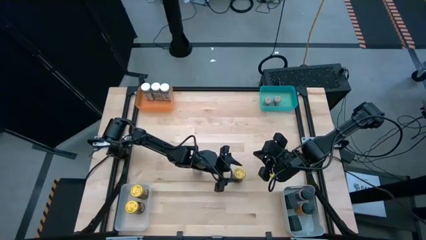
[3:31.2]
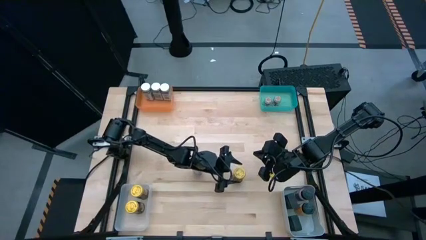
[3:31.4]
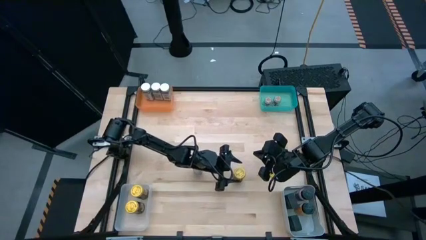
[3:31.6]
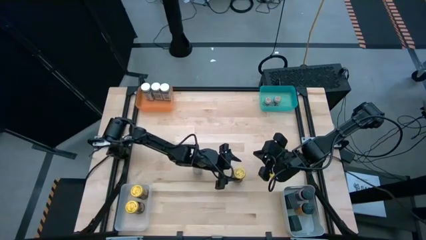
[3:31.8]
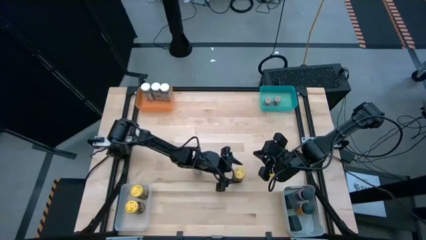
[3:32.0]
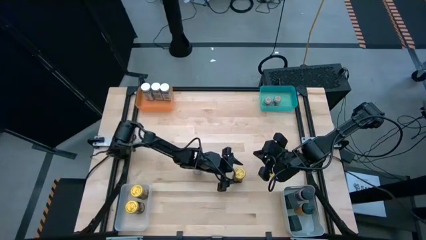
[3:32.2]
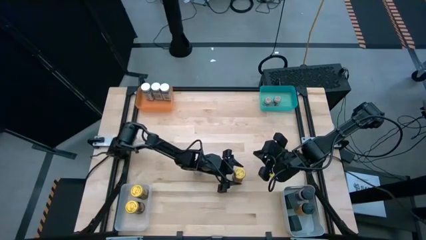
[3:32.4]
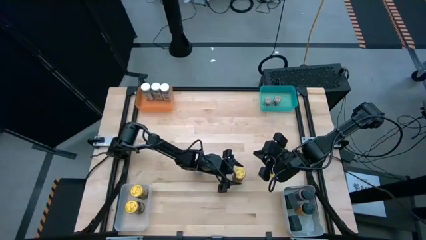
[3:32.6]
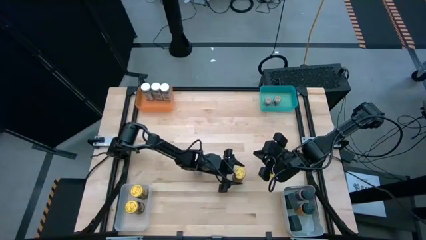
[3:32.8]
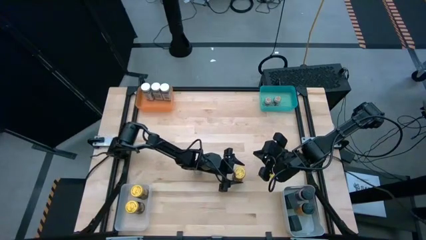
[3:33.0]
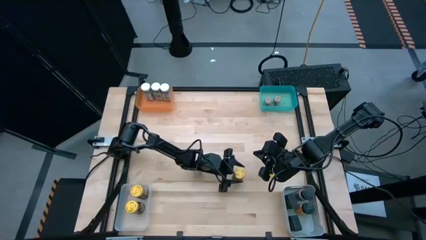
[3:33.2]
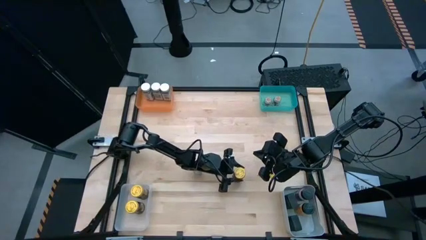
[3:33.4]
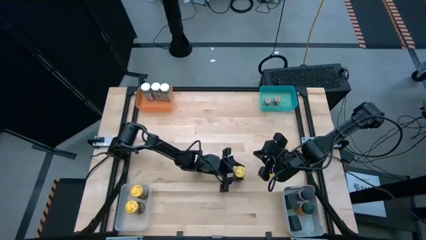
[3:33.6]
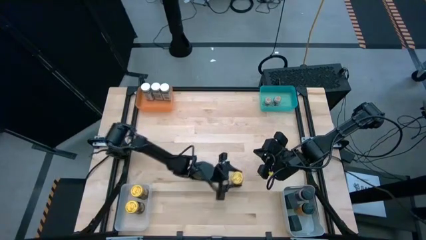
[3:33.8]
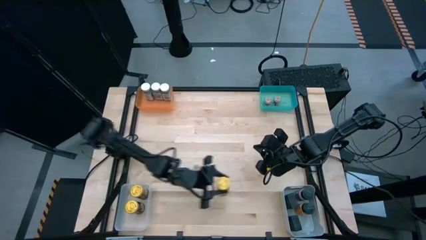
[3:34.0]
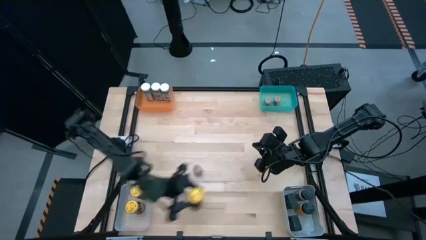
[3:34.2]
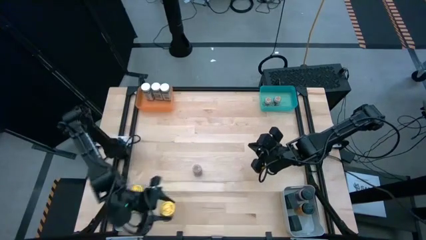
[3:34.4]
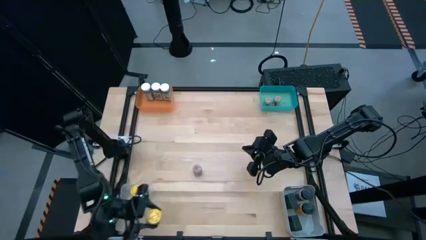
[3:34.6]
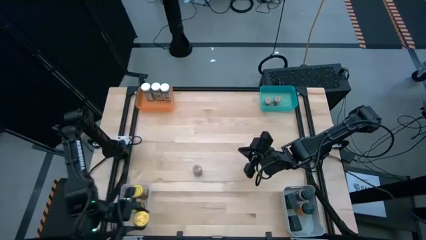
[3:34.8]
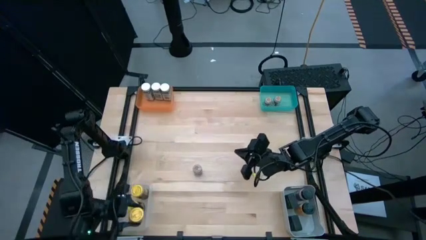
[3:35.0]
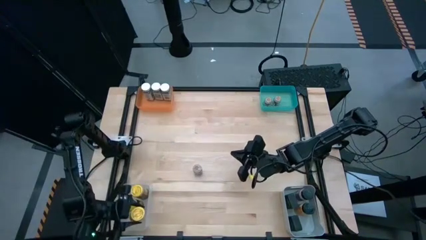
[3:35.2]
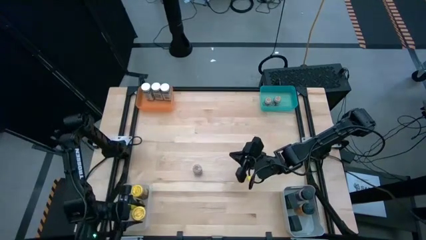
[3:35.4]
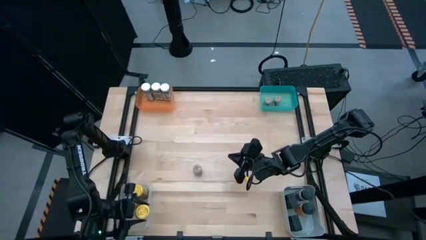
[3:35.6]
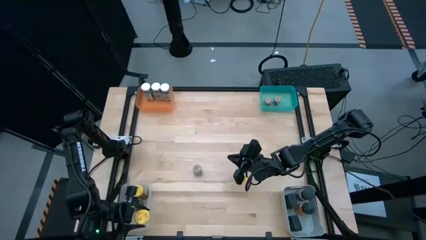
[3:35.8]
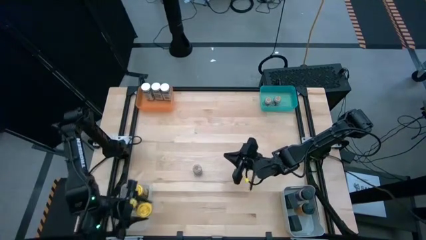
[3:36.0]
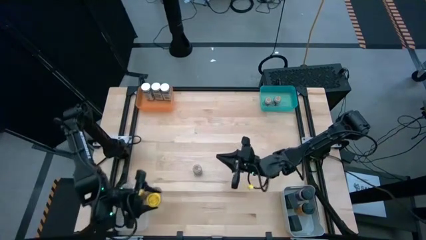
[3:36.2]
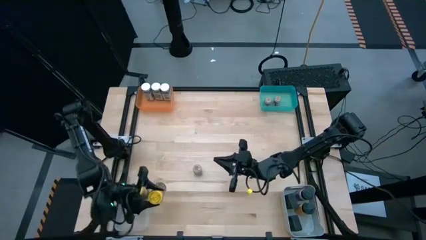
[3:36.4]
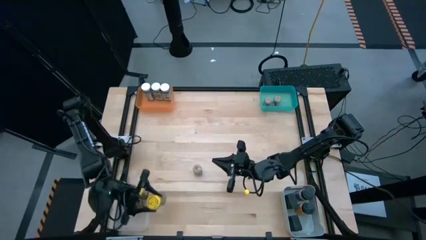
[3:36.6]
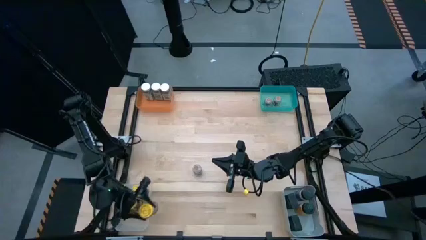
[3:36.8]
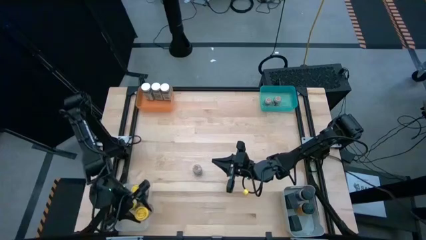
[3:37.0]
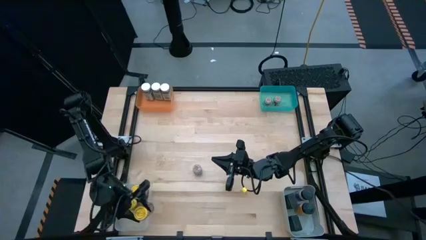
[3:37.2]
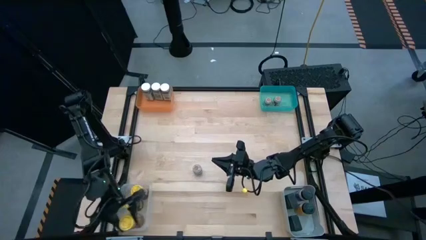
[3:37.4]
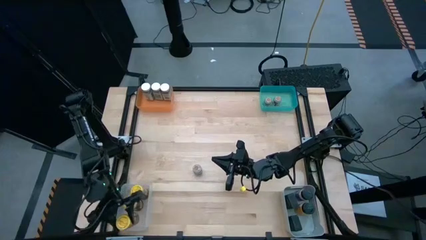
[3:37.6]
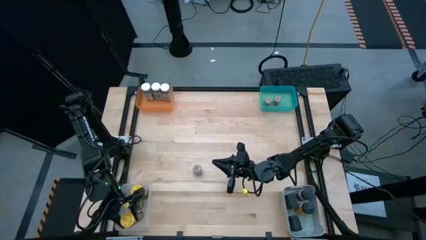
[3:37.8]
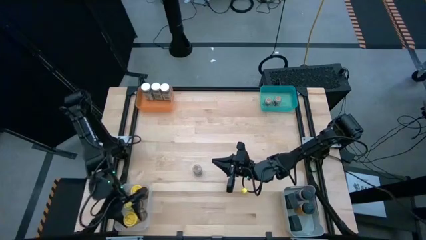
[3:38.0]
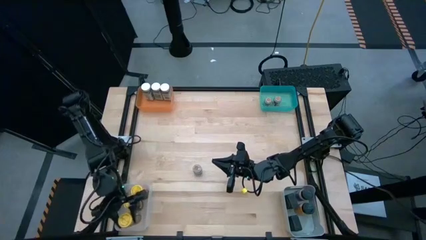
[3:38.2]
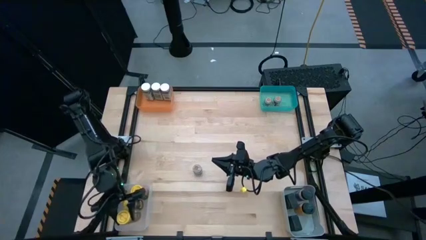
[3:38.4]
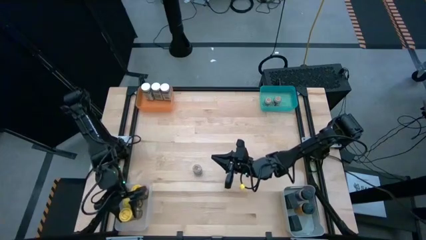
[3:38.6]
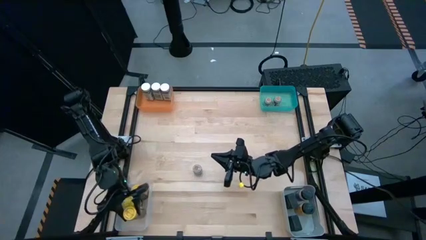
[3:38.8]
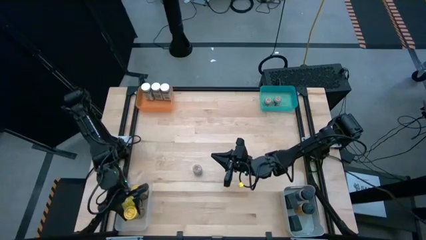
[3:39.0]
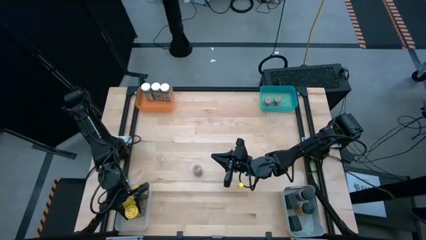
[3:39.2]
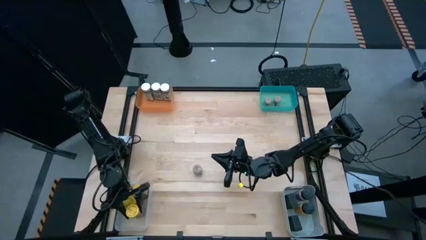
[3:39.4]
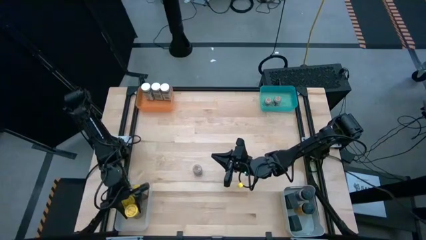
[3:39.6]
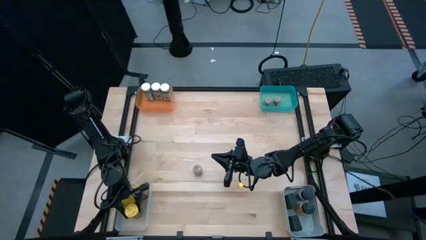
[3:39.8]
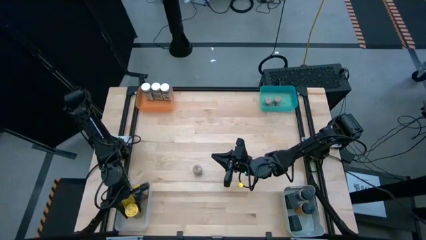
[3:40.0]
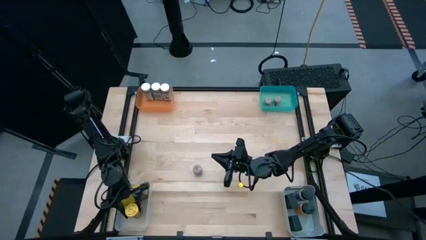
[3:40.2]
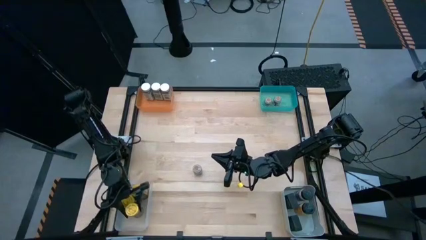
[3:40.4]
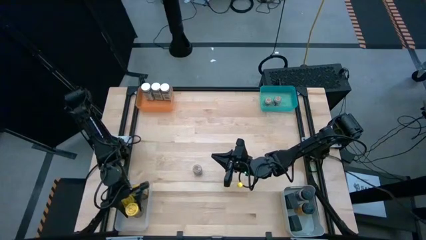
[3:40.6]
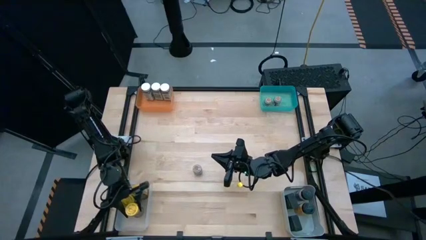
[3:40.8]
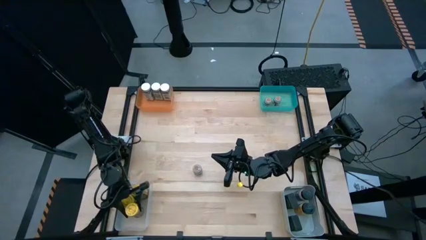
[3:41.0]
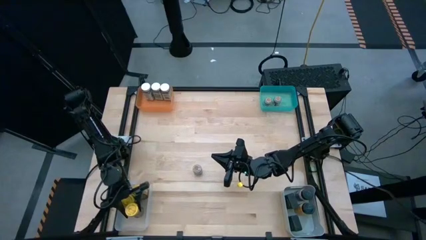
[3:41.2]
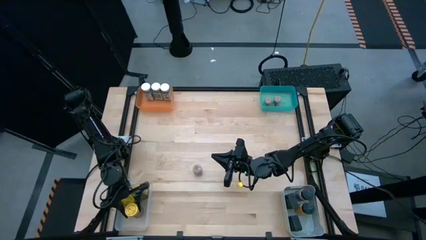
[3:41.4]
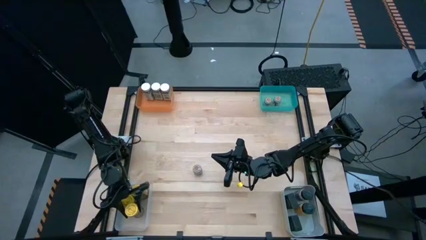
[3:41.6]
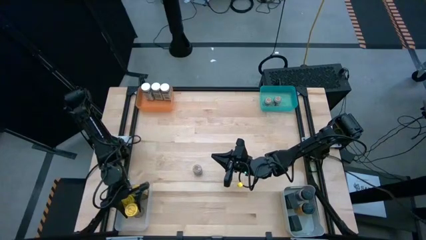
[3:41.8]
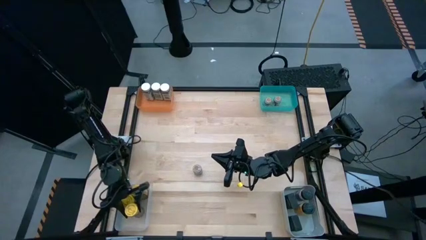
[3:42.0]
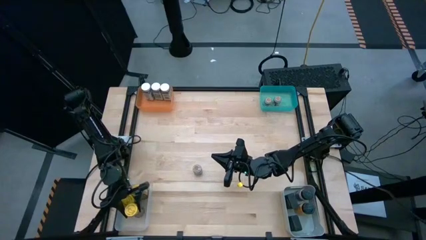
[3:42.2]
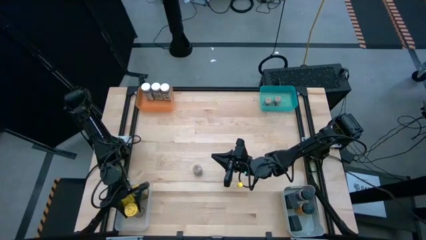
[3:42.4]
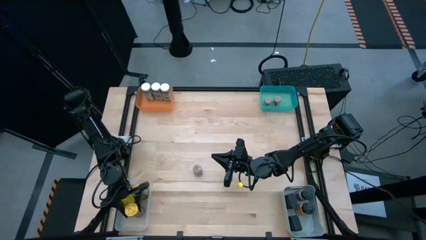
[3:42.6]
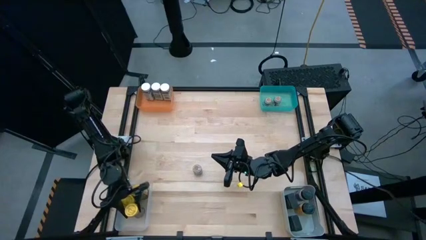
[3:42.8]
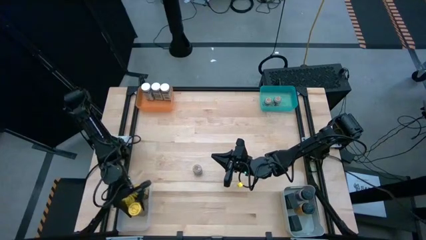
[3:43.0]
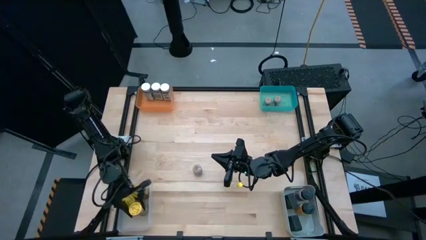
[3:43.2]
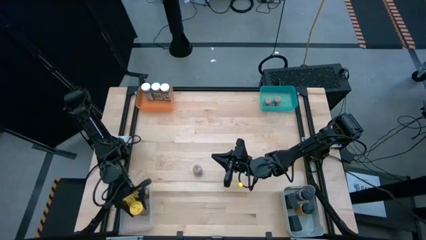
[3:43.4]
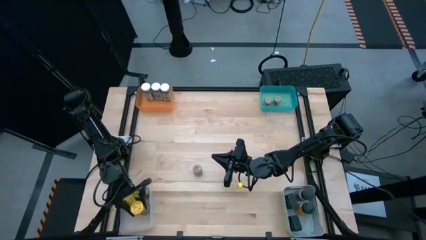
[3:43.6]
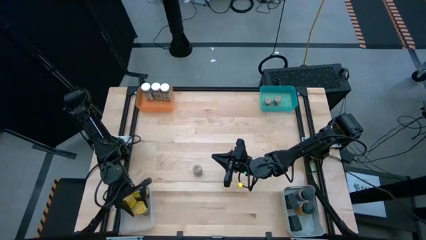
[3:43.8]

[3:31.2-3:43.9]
Task: Sort spices by type
Put the yellow seasoning bottle into the transparent bin

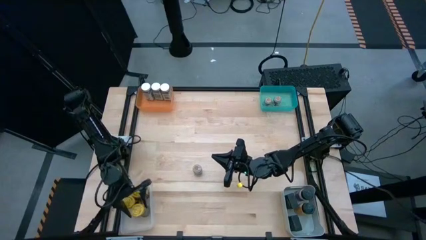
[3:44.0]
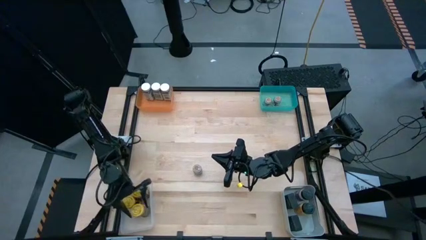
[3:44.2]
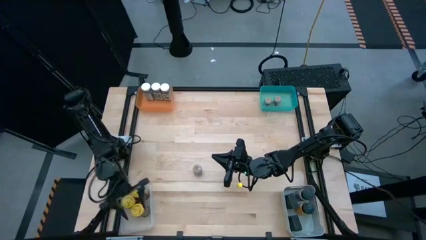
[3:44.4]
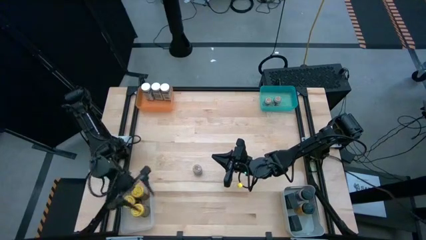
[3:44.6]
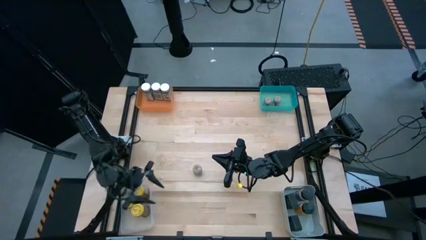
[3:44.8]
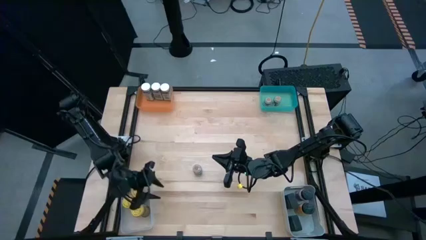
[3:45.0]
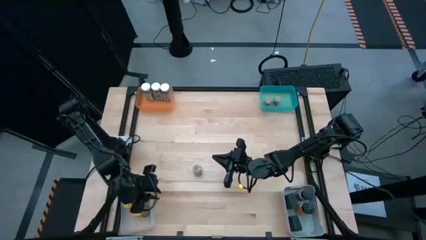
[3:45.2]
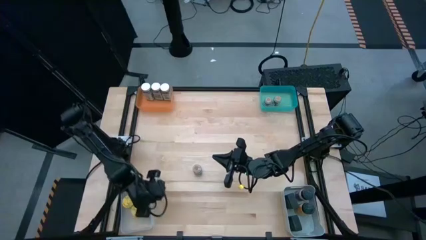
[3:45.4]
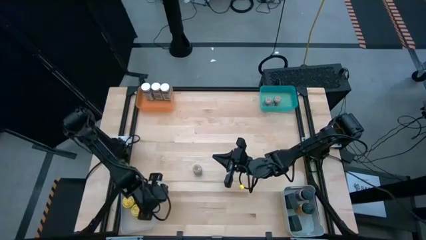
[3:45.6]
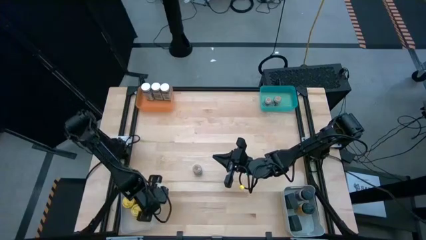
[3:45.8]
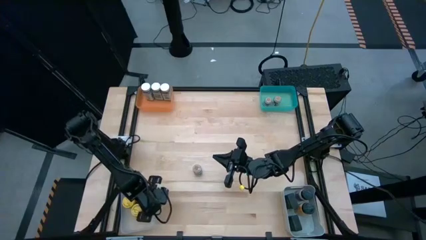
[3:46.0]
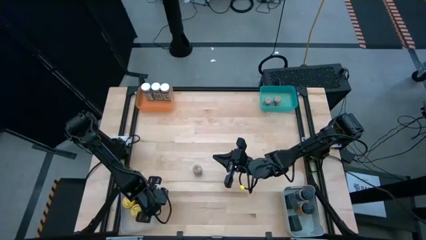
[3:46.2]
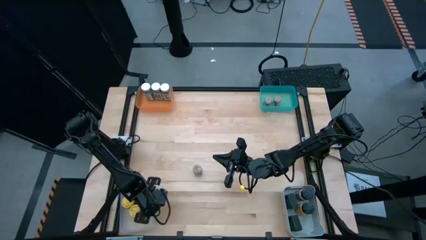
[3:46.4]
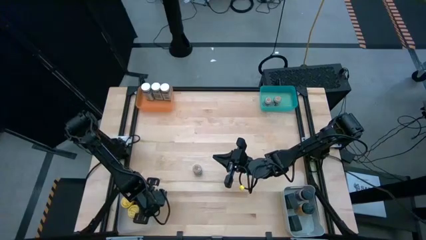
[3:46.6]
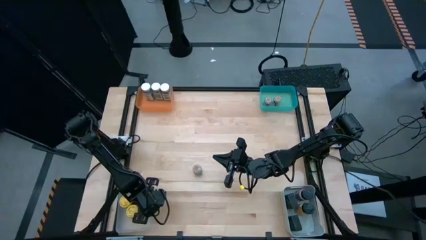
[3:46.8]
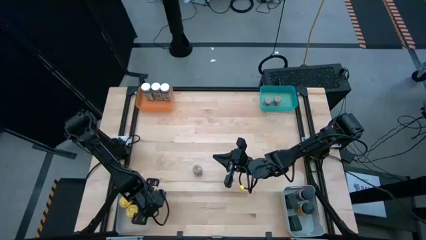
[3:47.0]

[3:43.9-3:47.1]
Adjust the transparent bin
